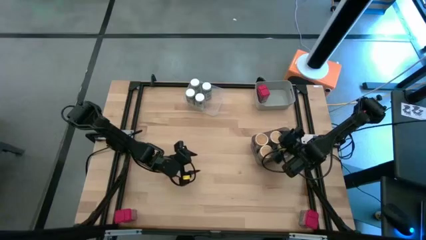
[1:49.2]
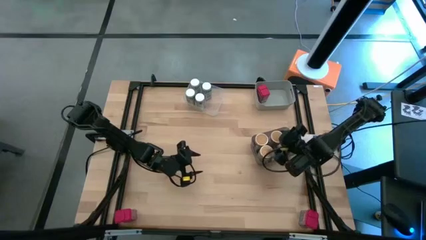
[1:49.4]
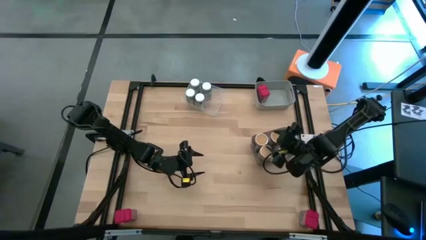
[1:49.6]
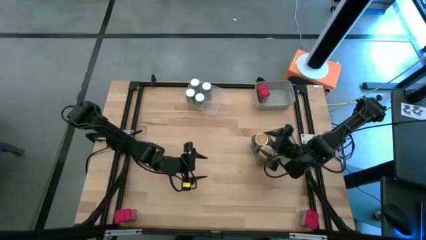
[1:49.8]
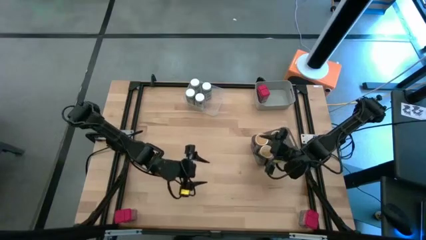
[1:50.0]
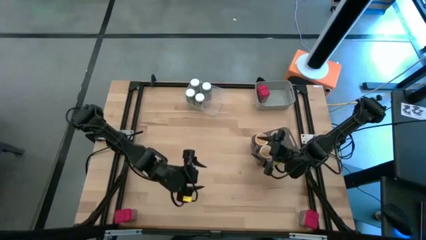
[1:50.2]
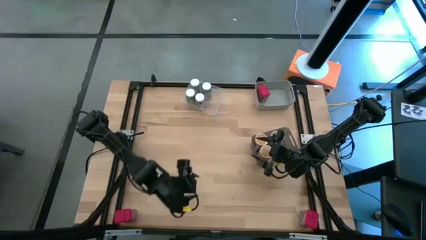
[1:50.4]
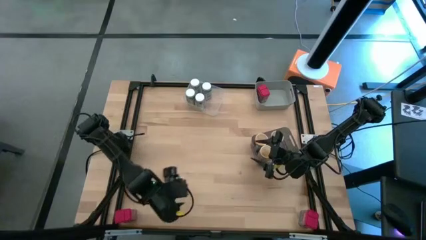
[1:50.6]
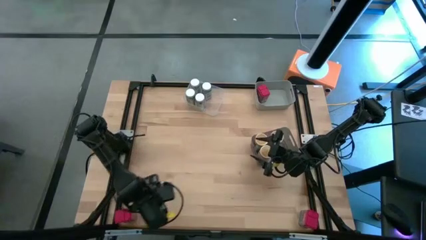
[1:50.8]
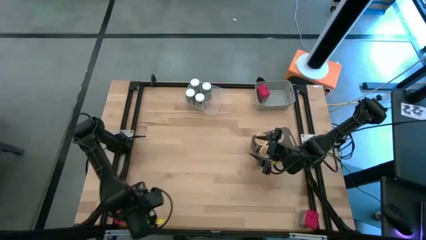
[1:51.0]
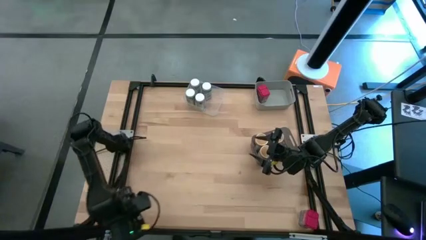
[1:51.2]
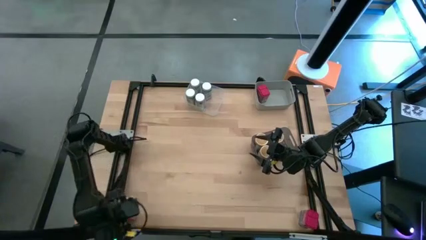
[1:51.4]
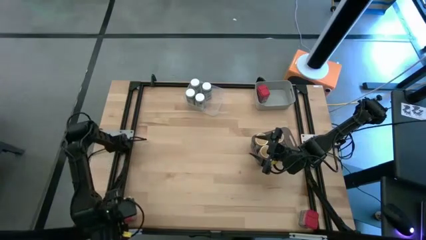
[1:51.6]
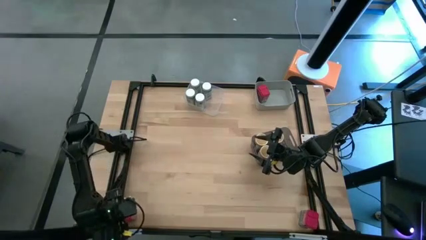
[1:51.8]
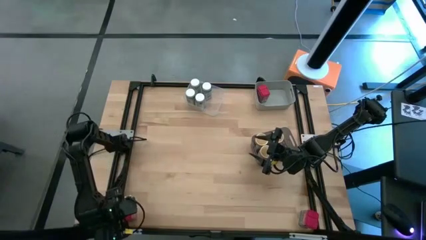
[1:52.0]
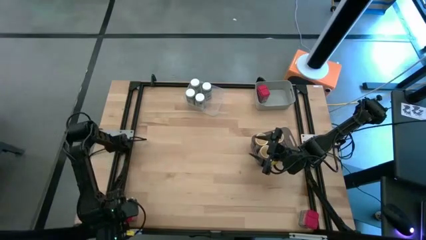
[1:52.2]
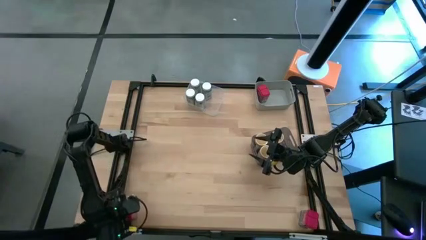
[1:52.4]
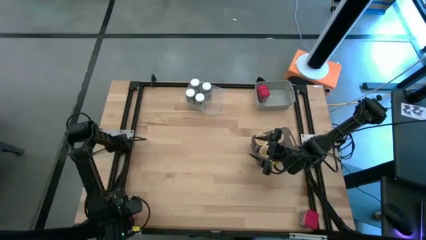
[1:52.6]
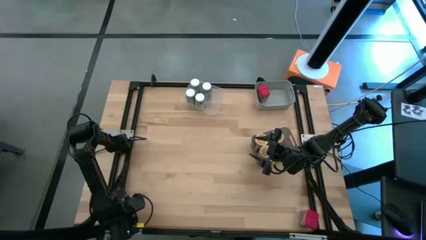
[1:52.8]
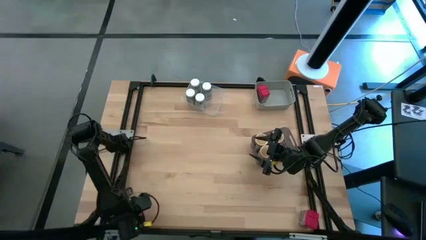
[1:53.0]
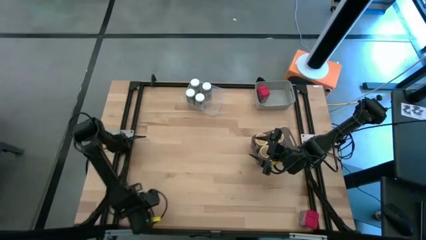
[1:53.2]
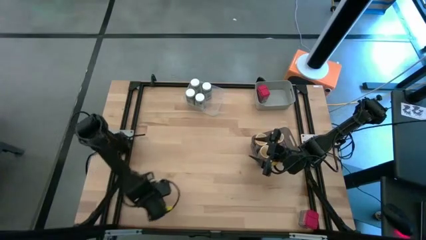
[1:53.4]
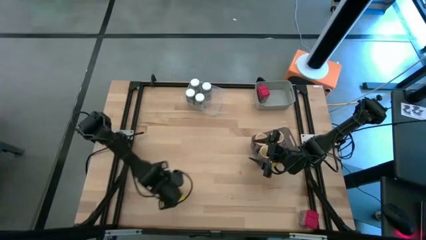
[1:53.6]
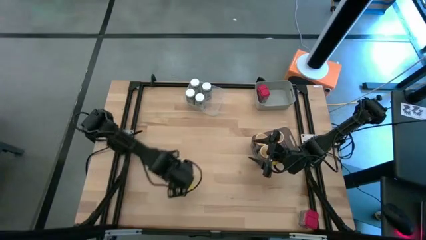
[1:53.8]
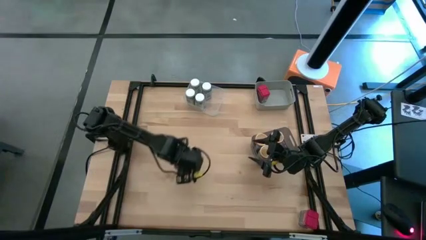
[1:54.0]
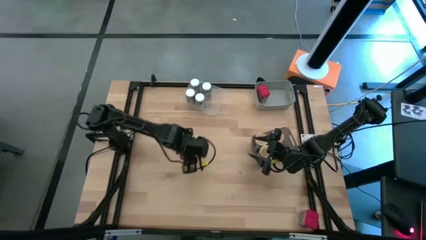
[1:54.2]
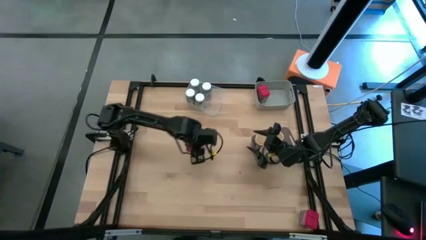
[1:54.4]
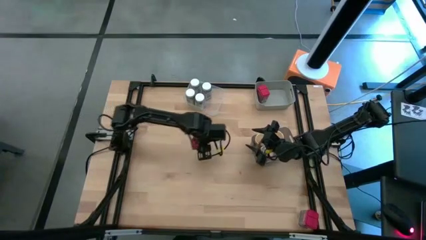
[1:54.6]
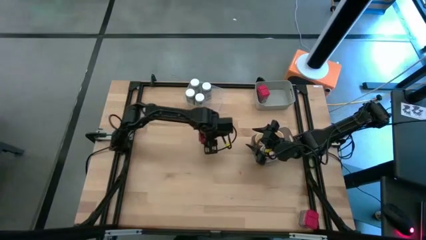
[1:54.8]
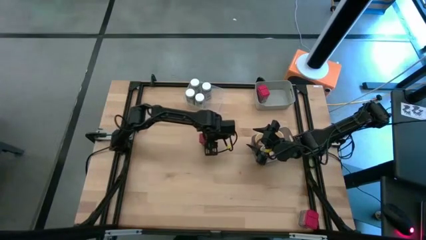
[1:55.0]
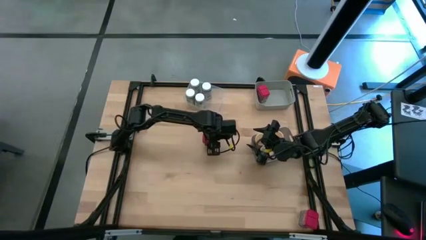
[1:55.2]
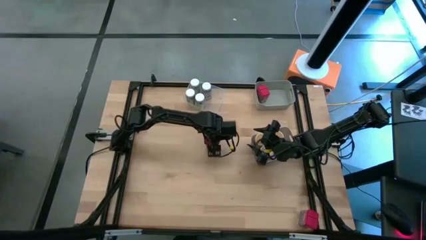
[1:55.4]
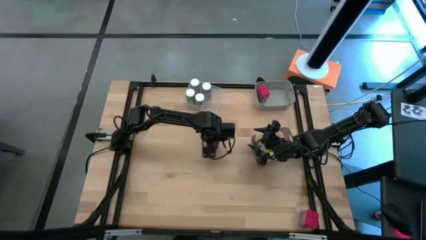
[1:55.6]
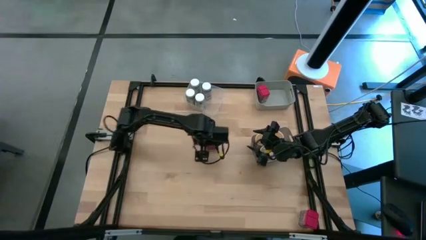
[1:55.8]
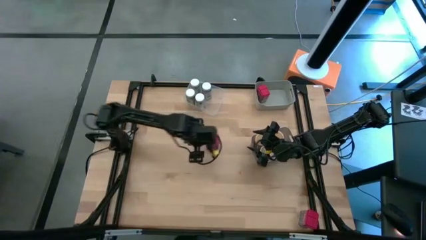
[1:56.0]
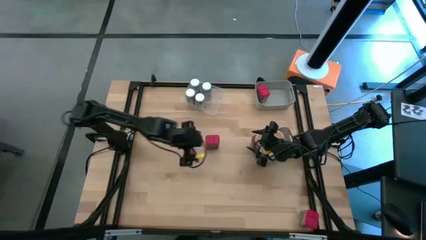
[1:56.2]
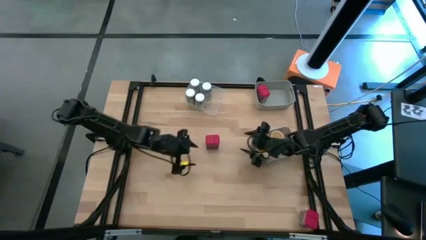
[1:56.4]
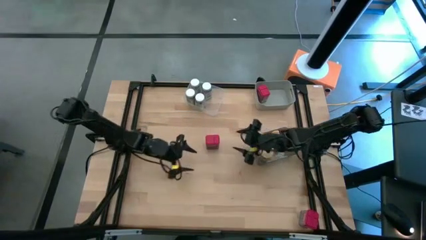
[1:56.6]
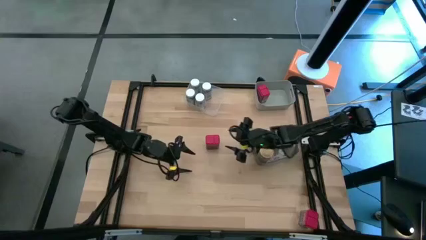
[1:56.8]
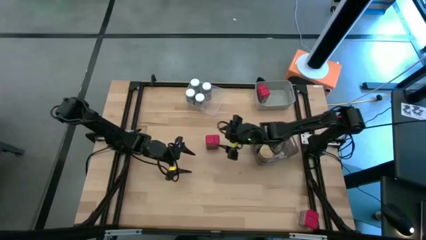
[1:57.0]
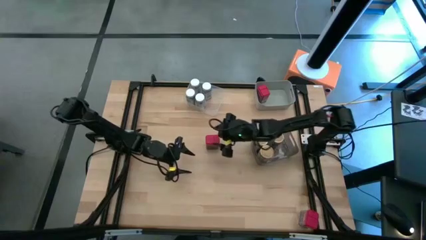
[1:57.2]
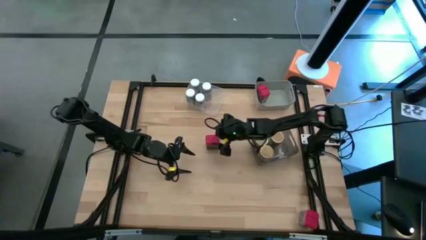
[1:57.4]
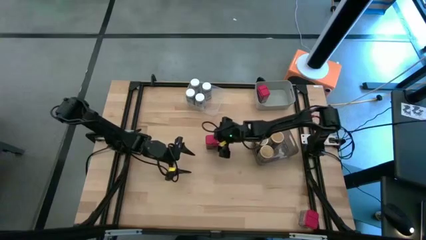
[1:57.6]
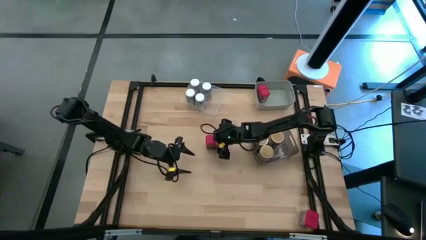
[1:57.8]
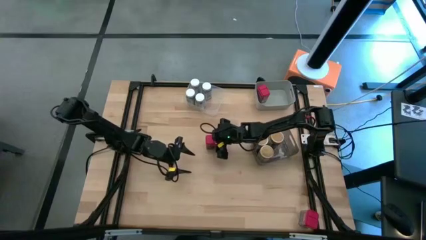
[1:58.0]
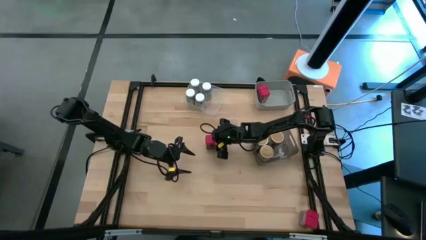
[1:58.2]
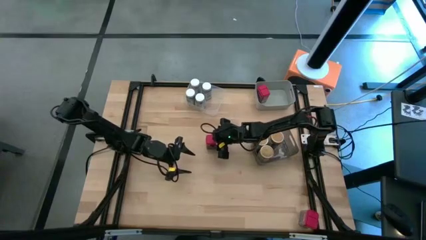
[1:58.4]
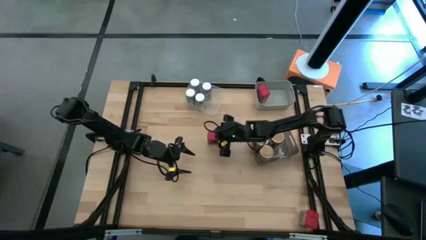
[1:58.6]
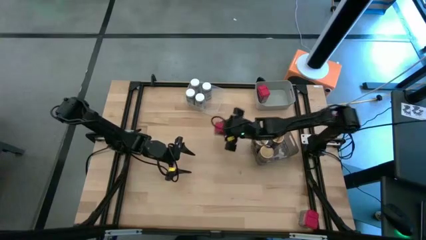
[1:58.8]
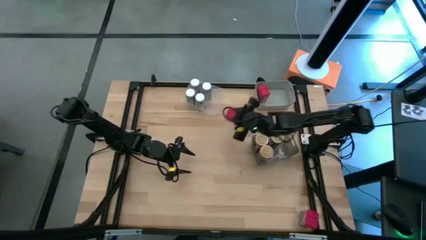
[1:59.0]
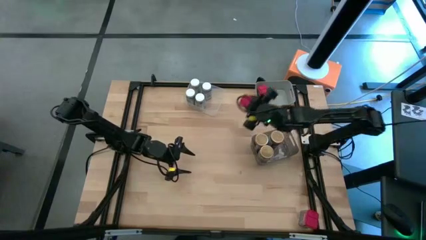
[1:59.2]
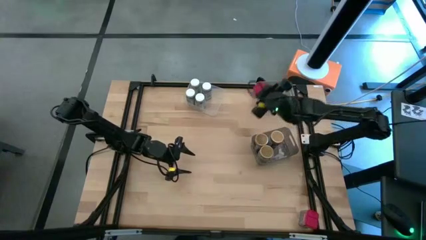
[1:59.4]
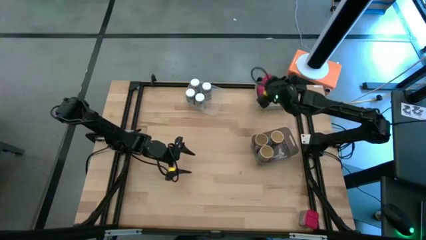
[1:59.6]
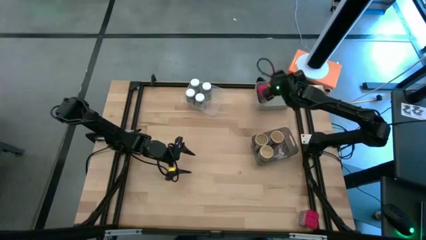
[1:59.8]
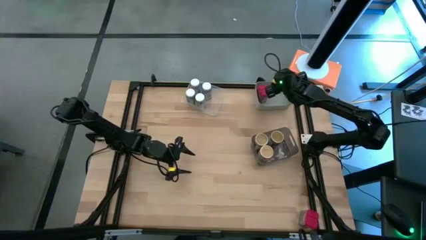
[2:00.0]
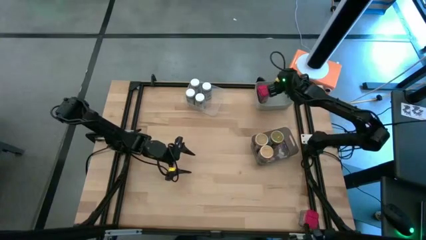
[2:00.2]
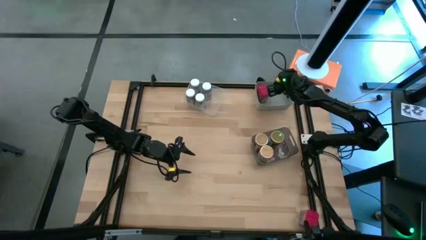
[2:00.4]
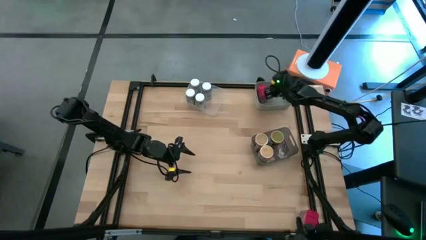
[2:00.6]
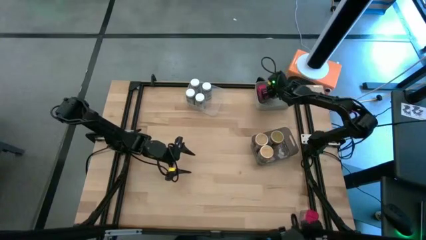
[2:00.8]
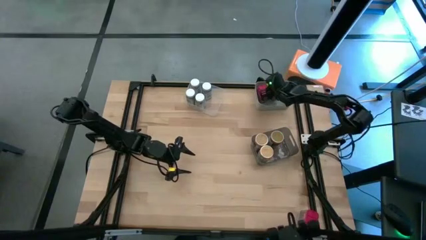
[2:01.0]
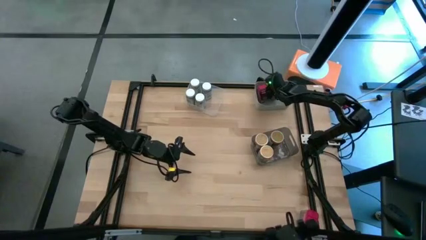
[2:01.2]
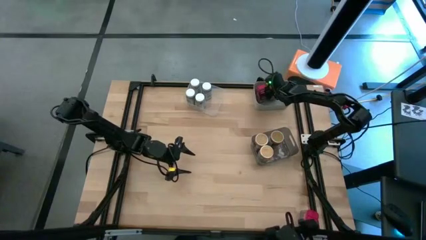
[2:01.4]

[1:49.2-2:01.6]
Task: Sort spices by type
Put the left red seasoning can into the gray bin
